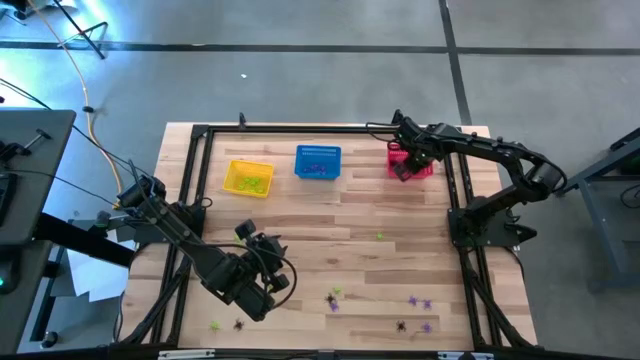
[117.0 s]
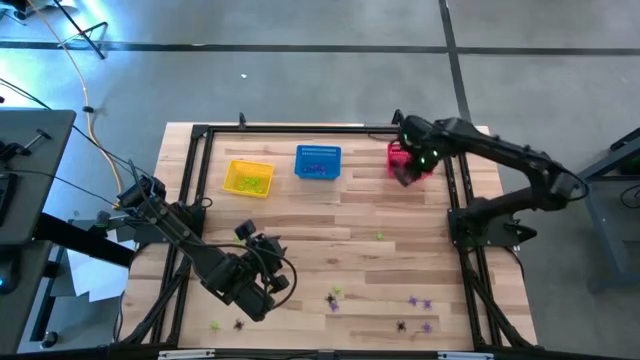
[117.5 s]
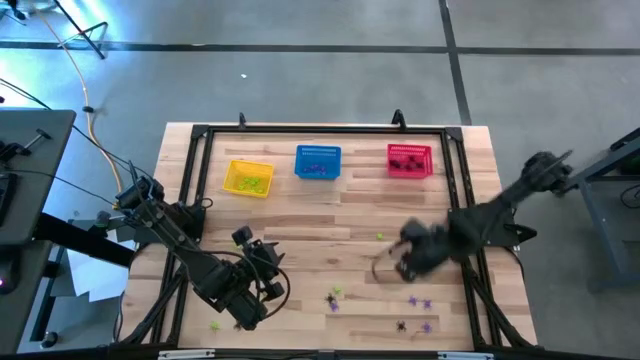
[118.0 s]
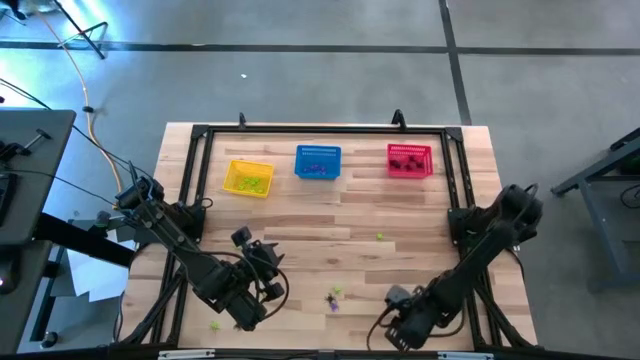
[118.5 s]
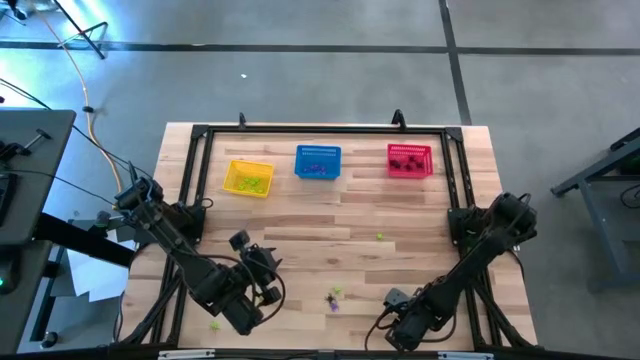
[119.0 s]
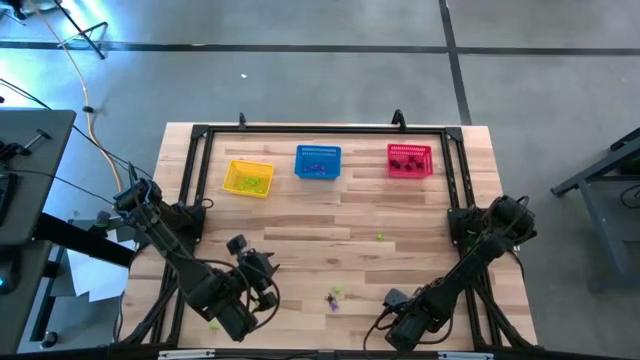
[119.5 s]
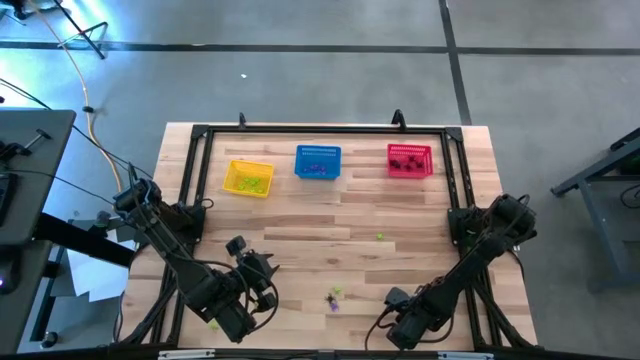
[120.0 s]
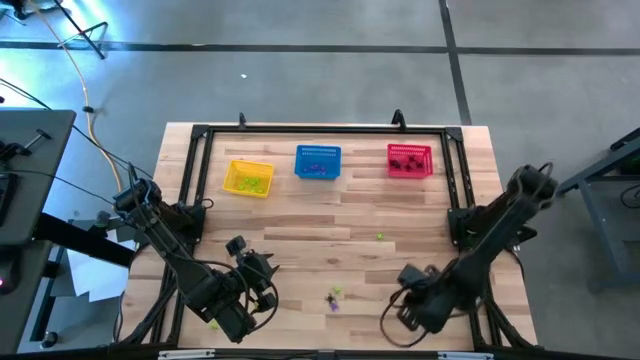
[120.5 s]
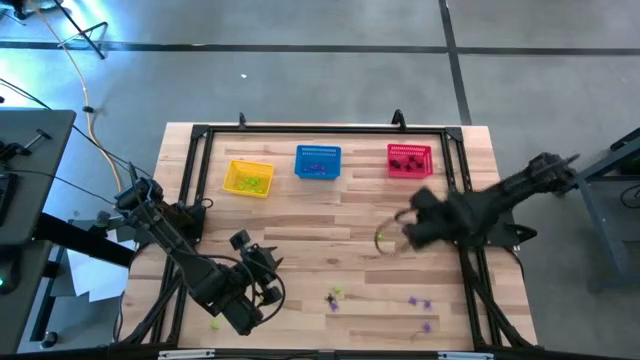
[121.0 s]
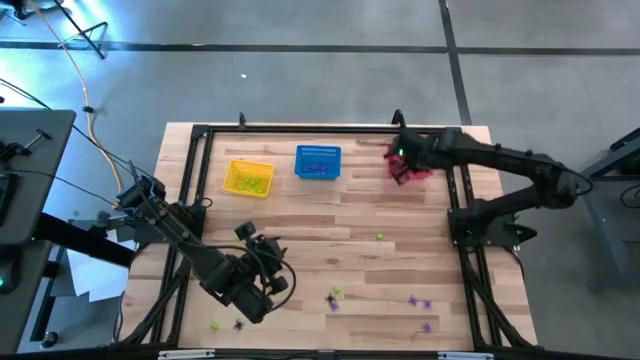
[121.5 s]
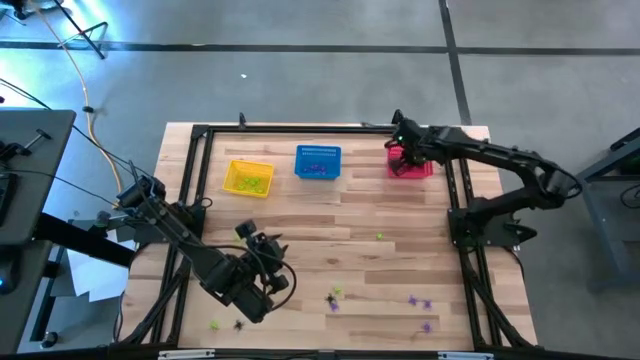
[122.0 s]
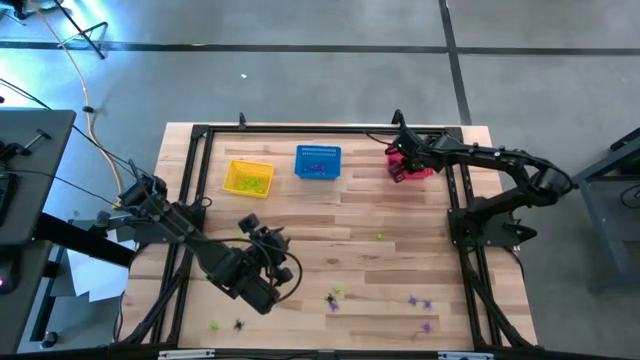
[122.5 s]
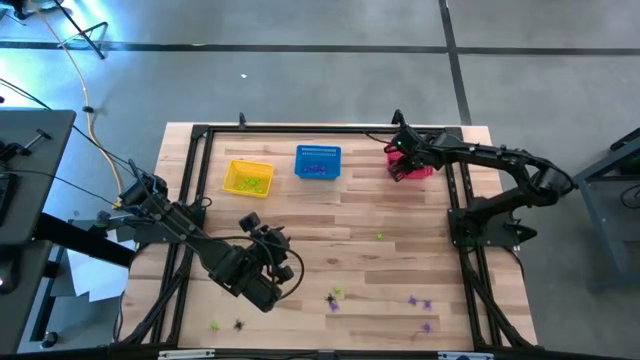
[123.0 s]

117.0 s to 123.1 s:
Task: Sort Halloween decoration
Put the black spider toy into the red bin

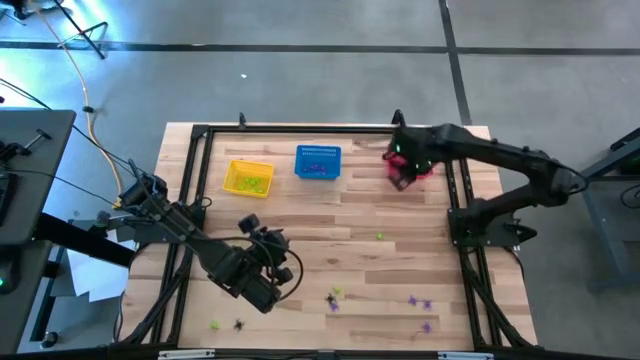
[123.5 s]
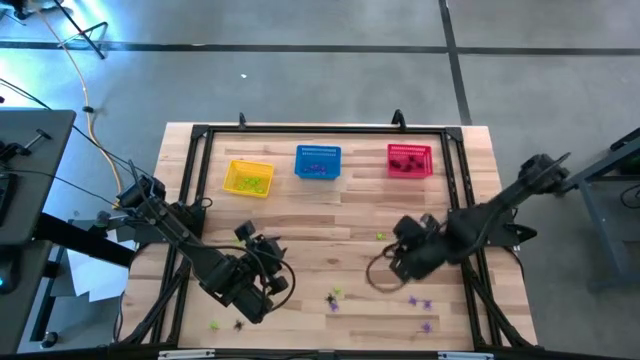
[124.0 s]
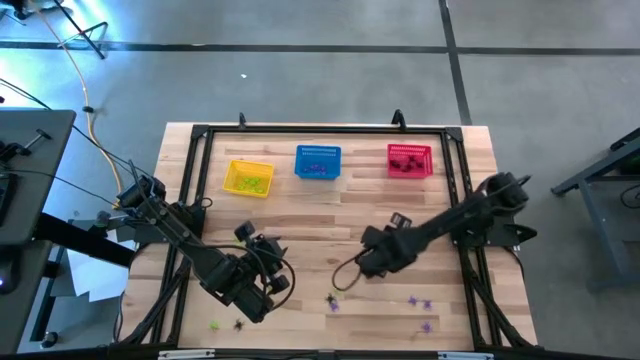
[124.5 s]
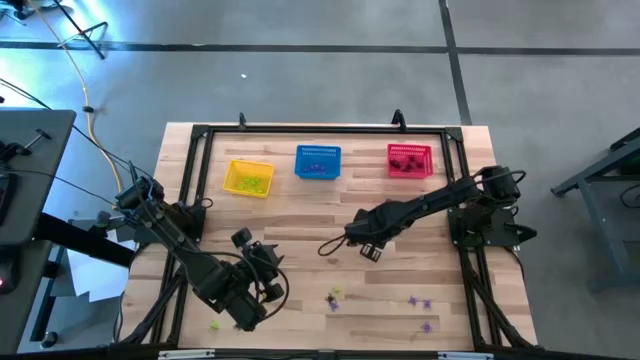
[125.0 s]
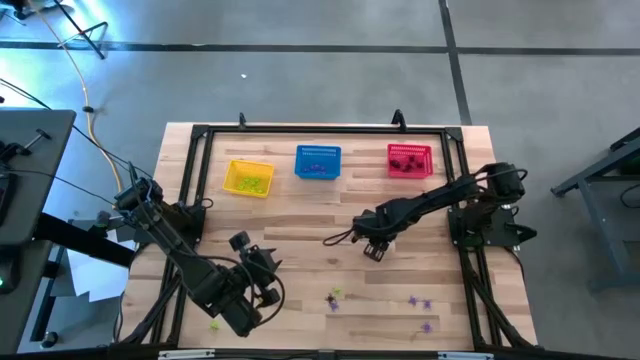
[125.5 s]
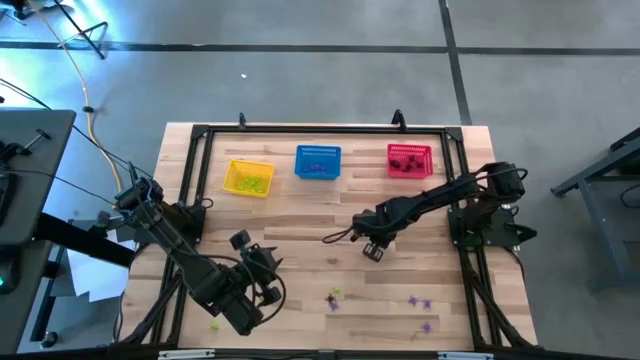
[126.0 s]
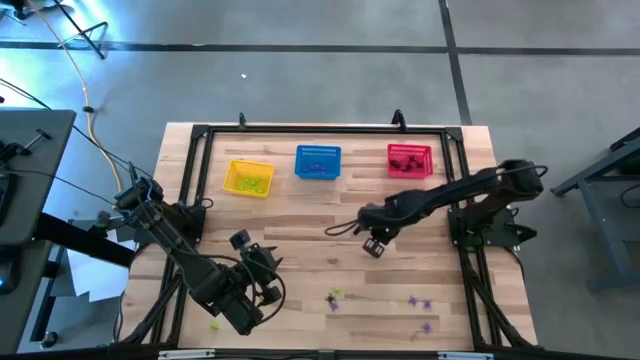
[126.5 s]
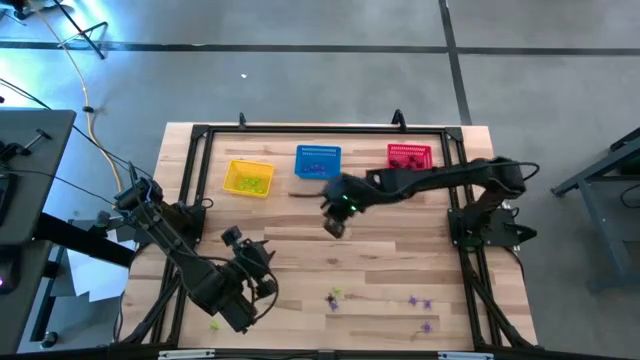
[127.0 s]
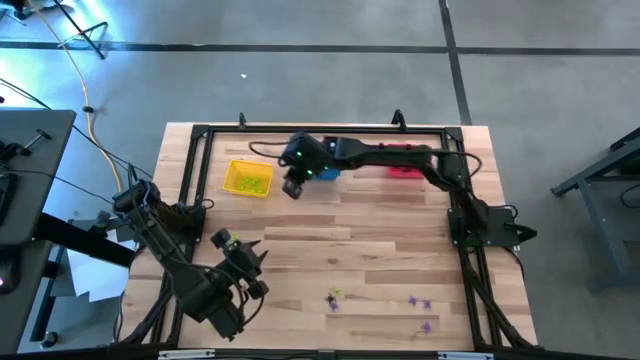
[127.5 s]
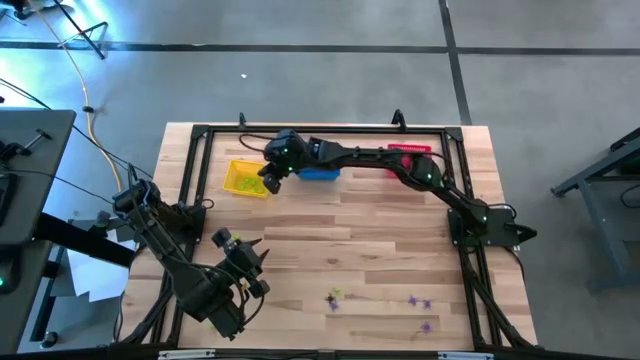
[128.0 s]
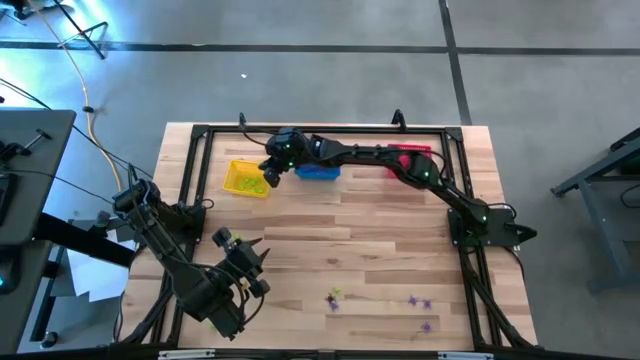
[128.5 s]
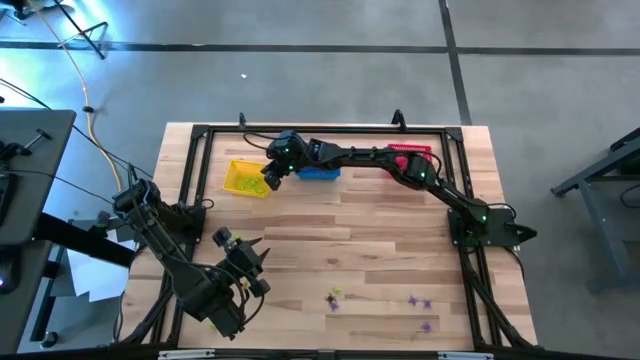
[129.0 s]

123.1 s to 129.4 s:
Put the green spider toy into the yellow bin

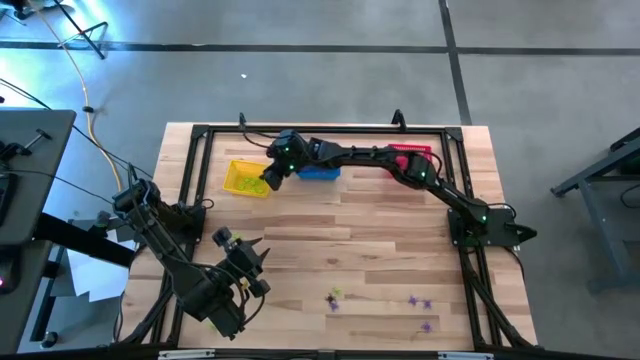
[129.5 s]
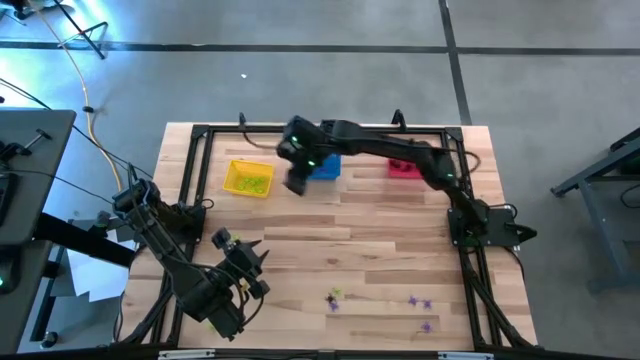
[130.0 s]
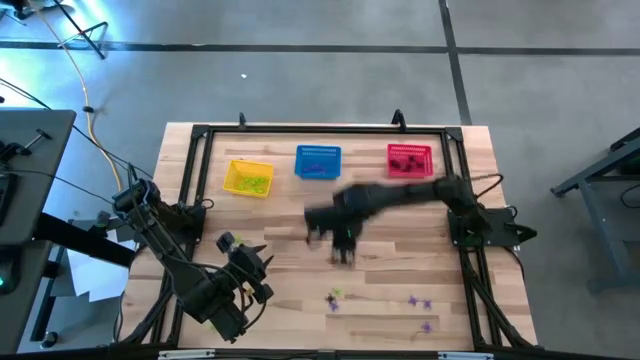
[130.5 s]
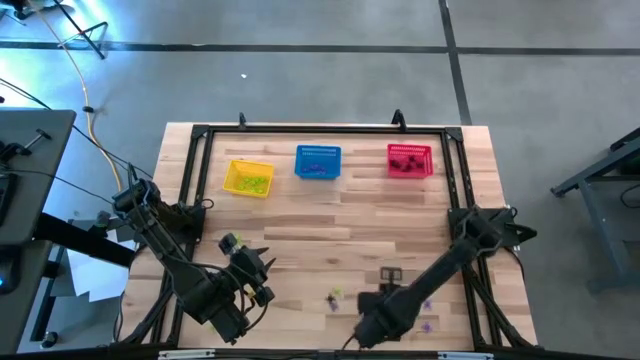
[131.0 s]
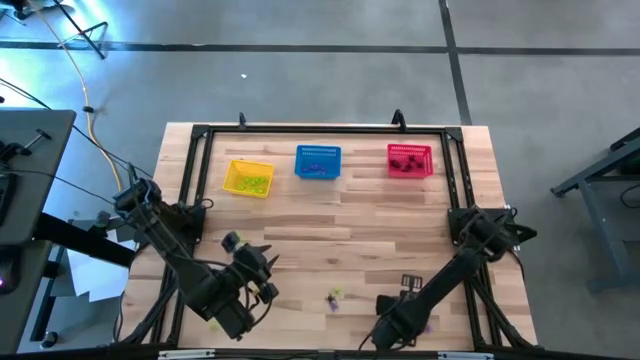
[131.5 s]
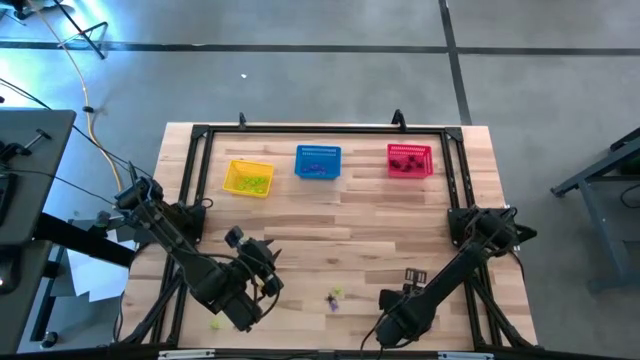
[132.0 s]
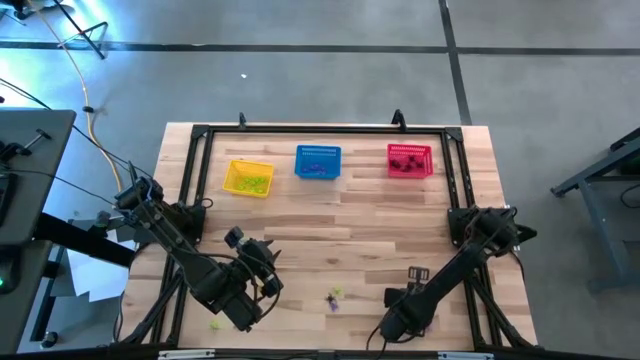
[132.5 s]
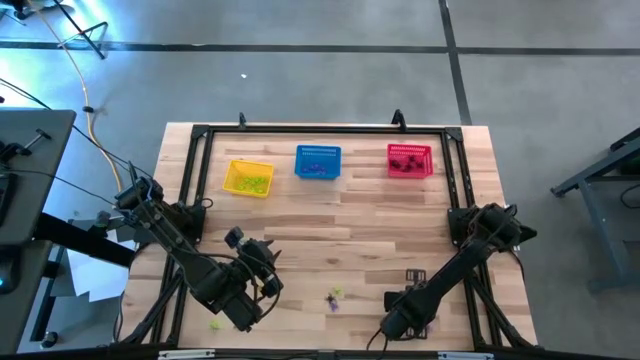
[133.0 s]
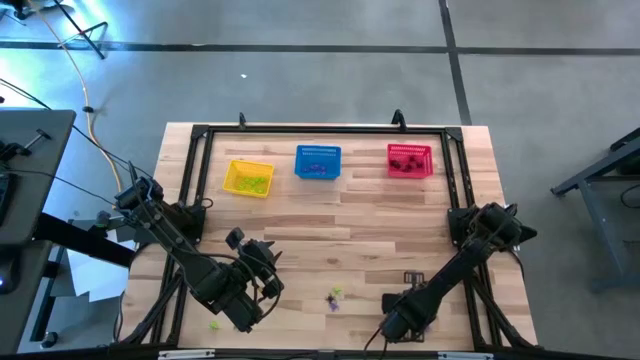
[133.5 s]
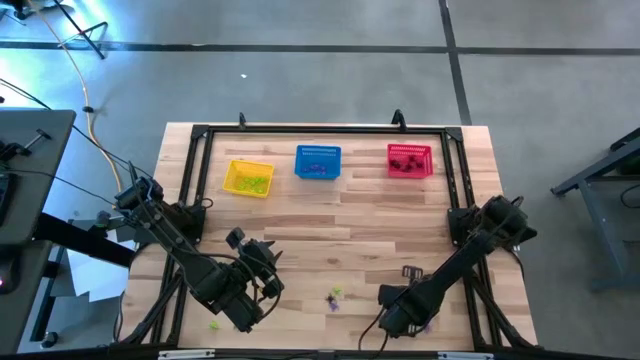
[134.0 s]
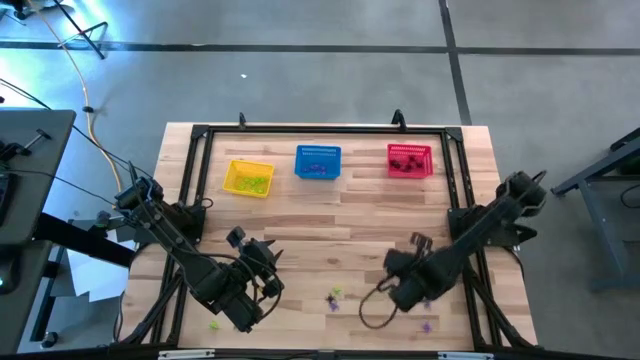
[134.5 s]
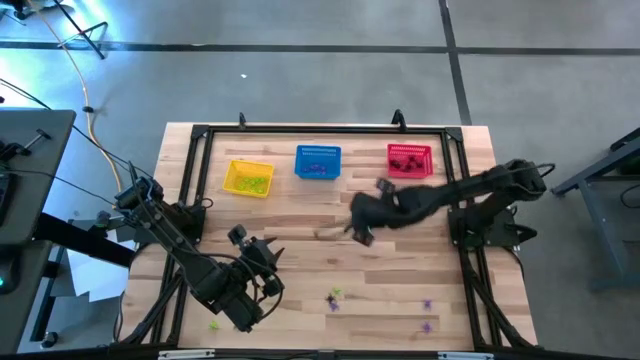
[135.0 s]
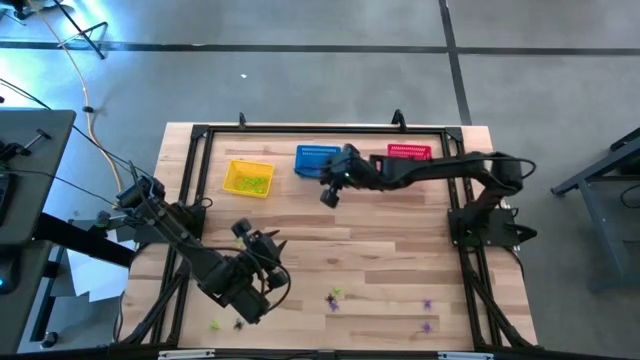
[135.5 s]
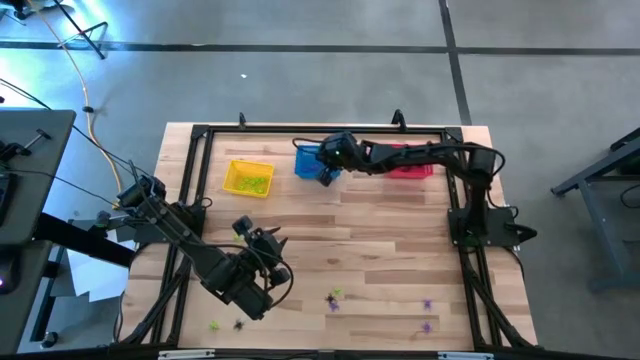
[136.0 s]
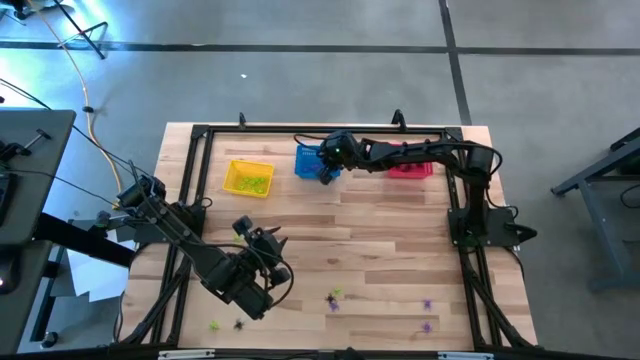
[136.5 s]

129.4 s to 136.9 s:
Put the purple spider toy into the blue bin
